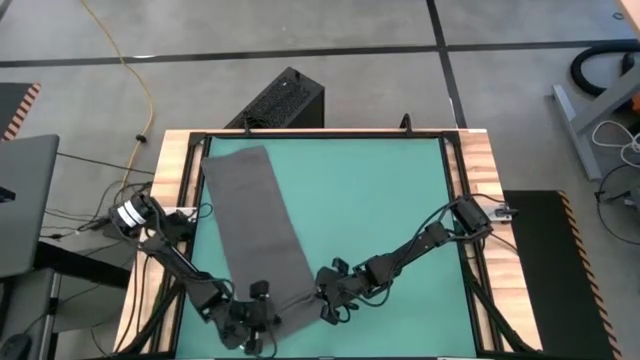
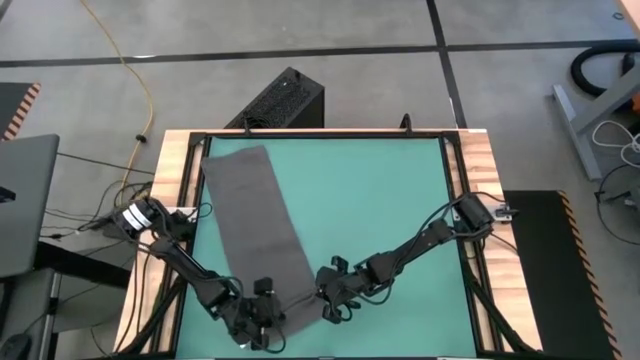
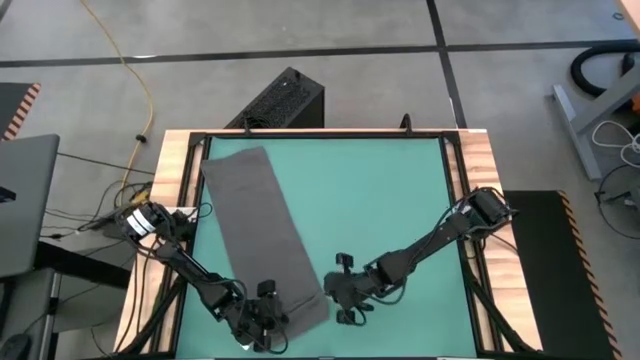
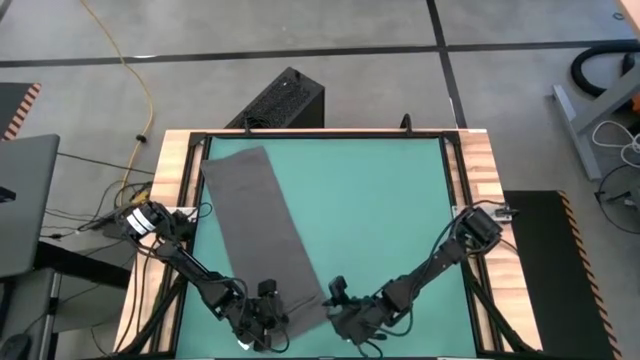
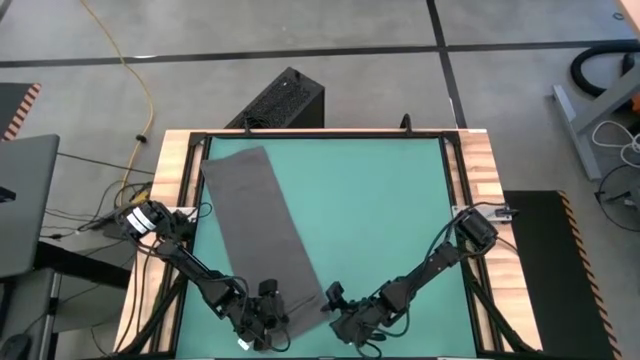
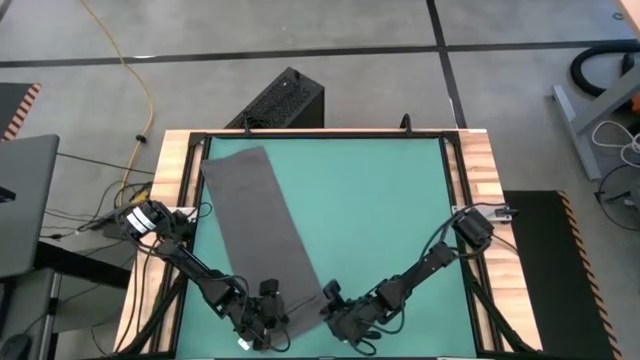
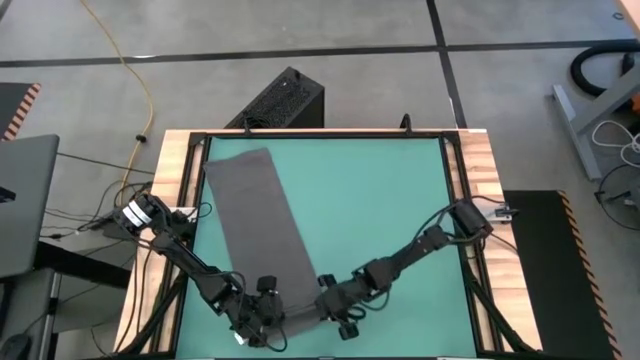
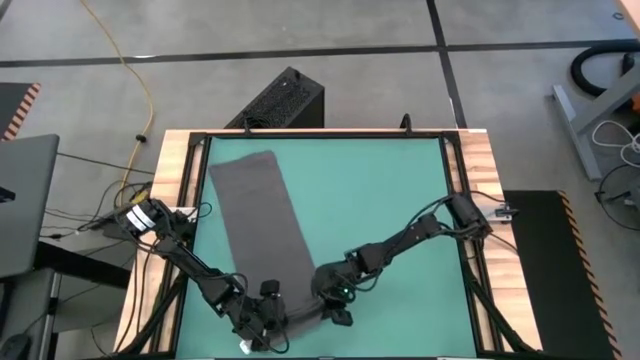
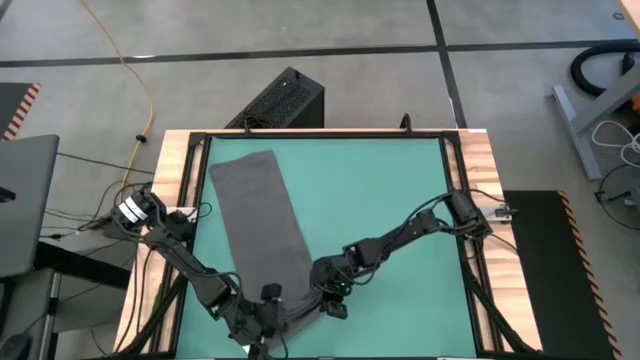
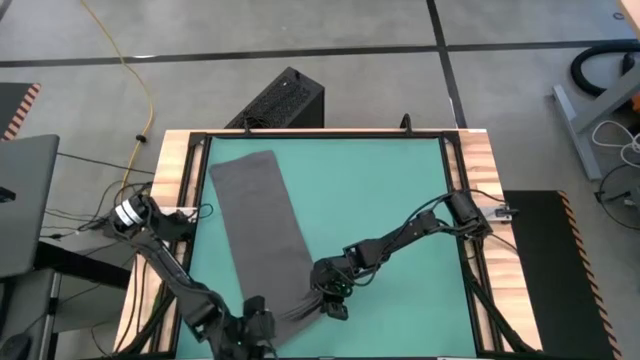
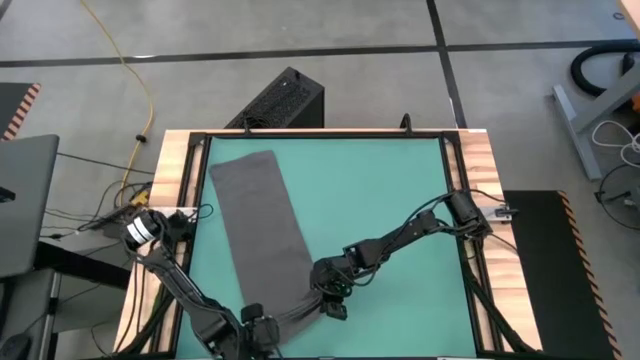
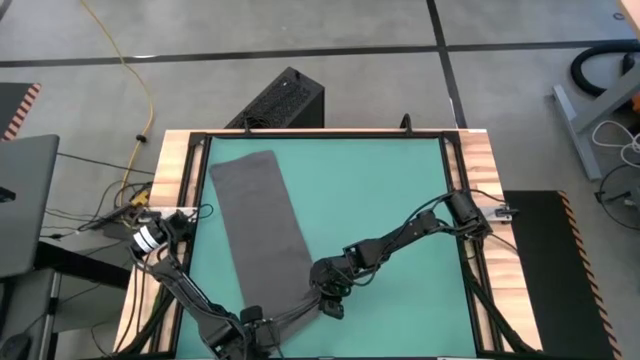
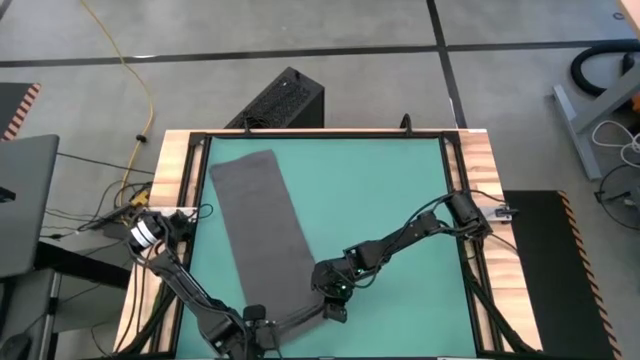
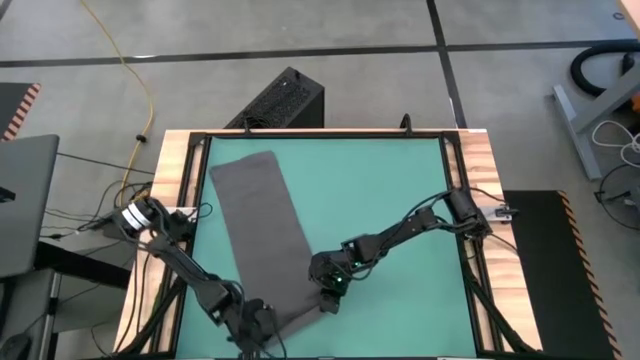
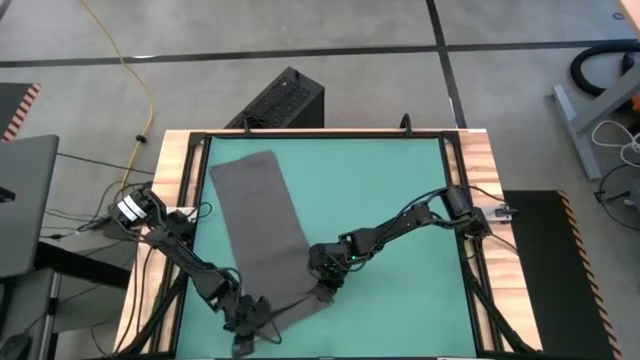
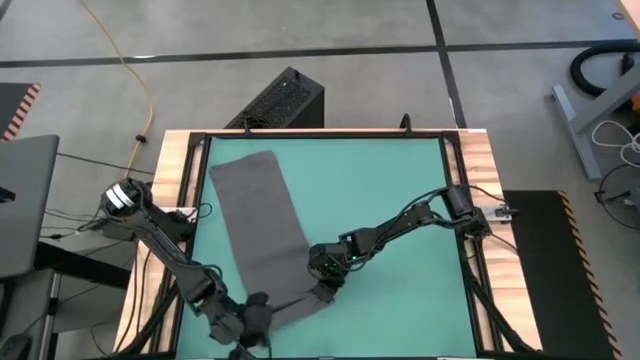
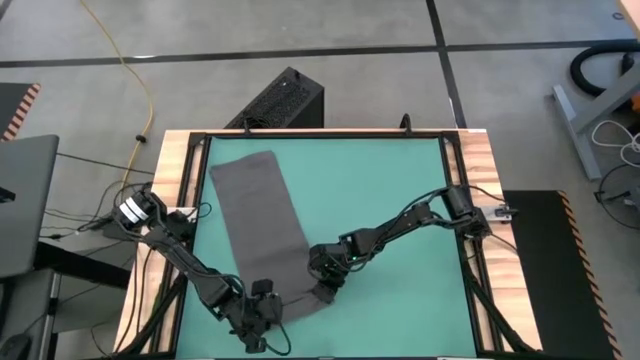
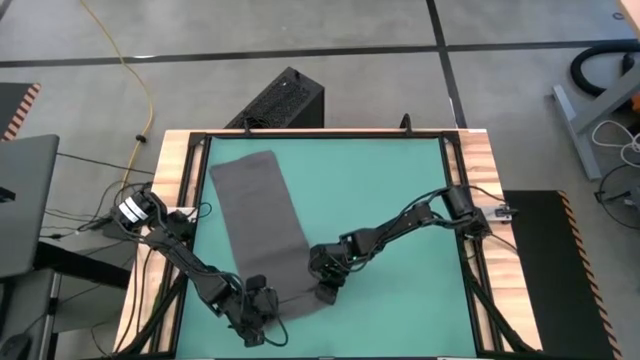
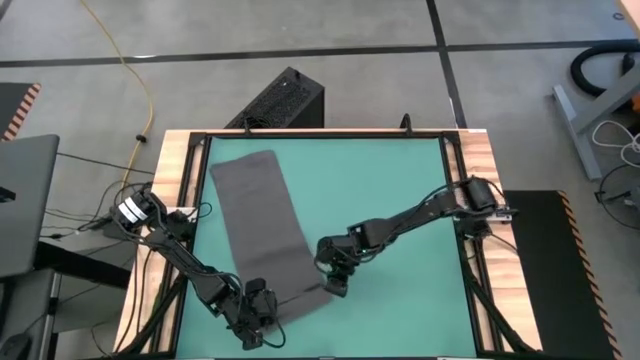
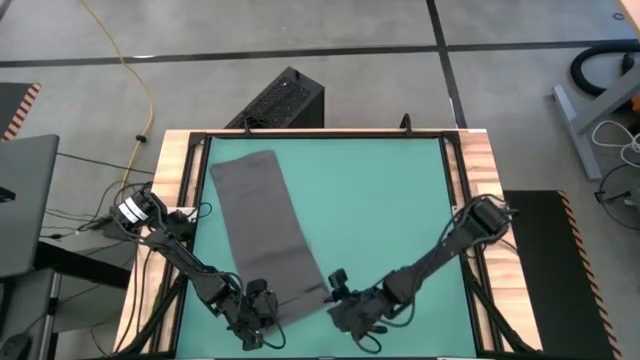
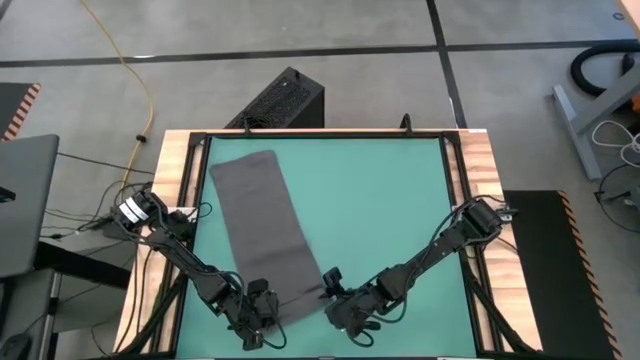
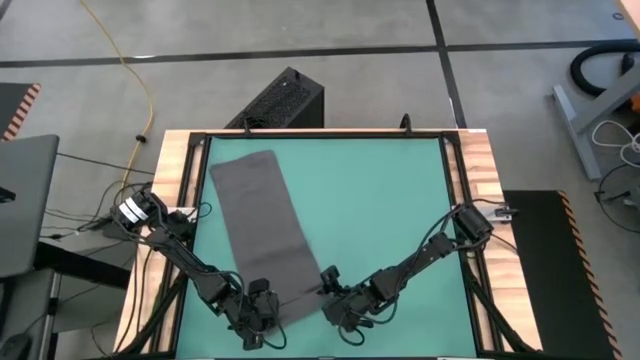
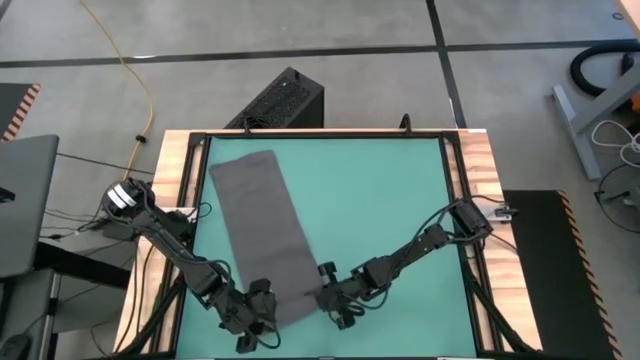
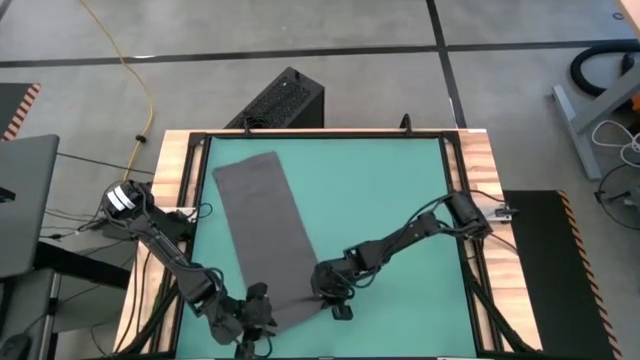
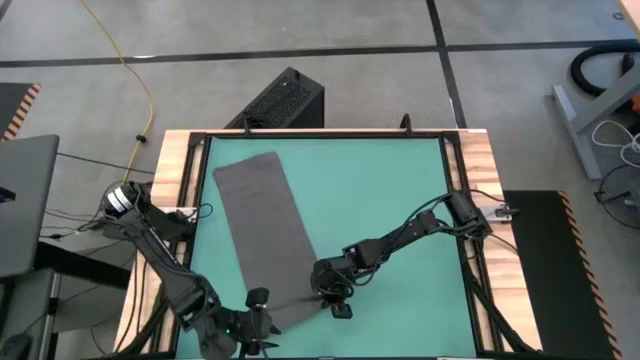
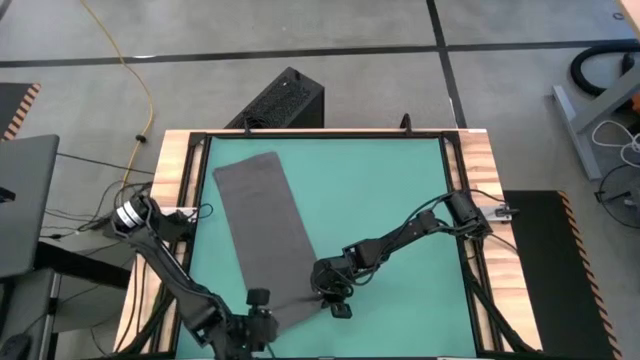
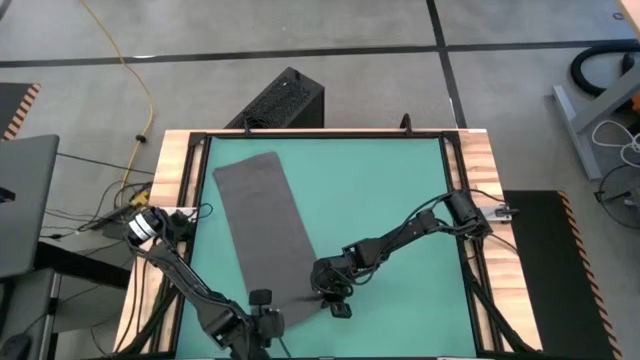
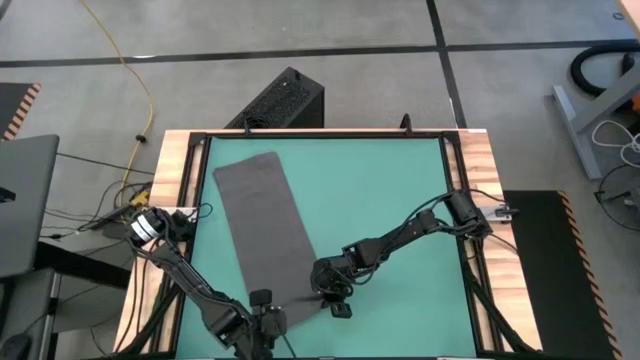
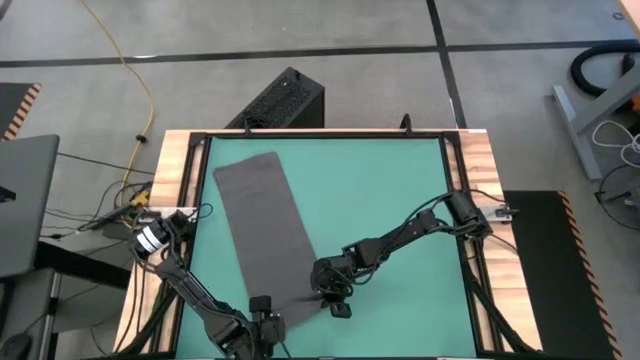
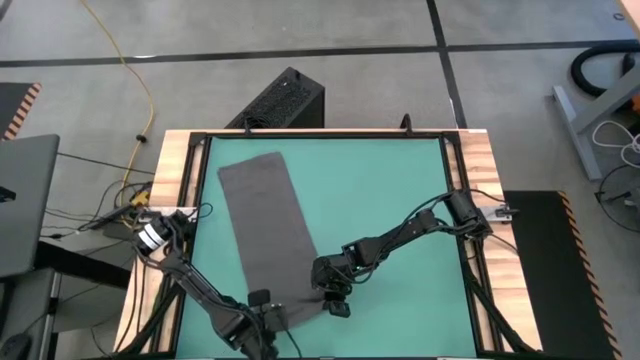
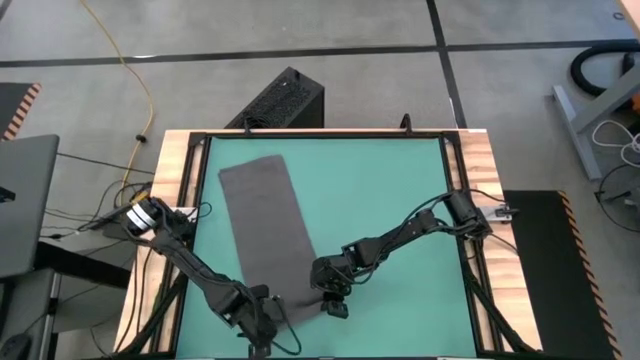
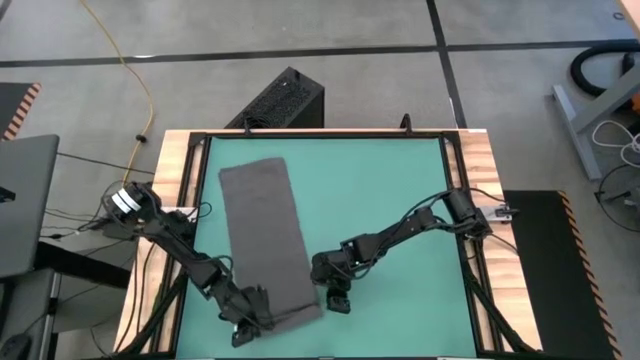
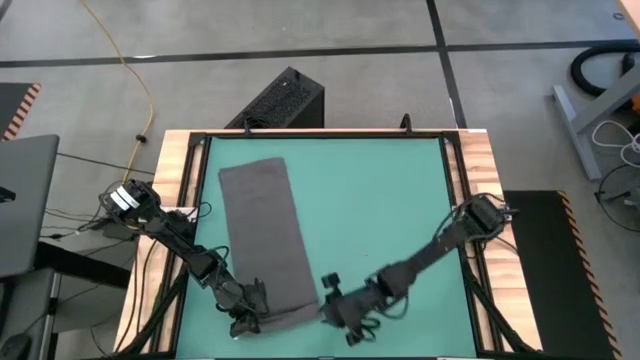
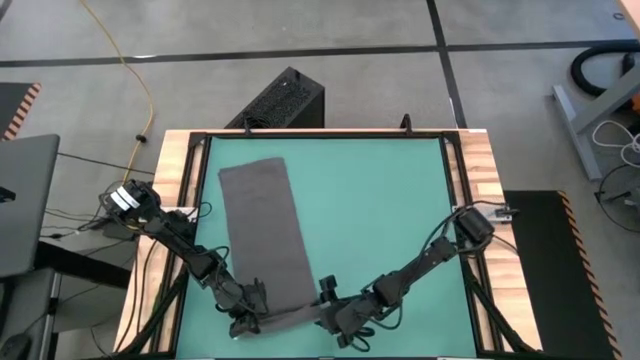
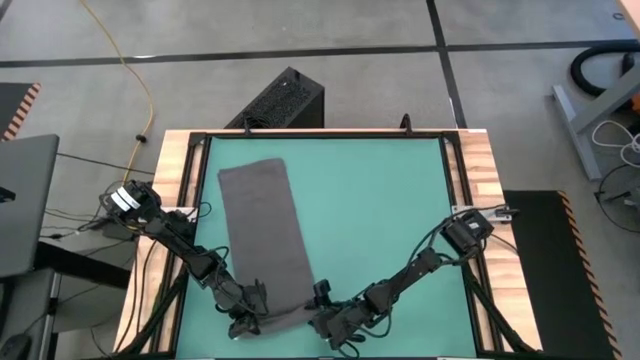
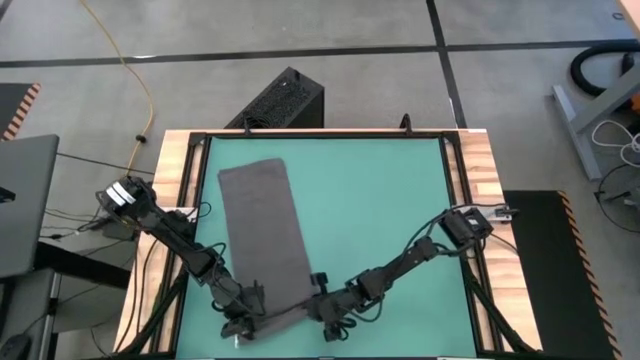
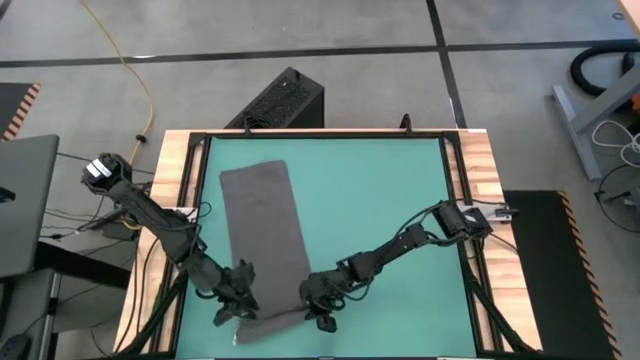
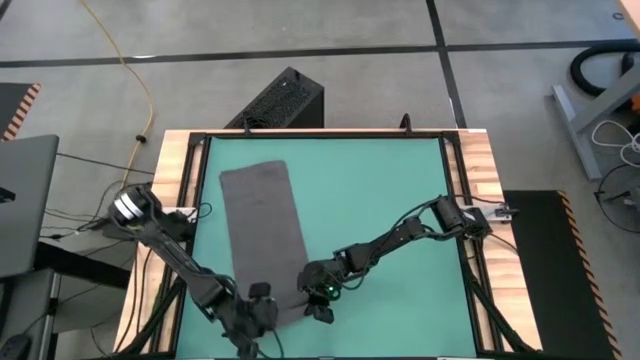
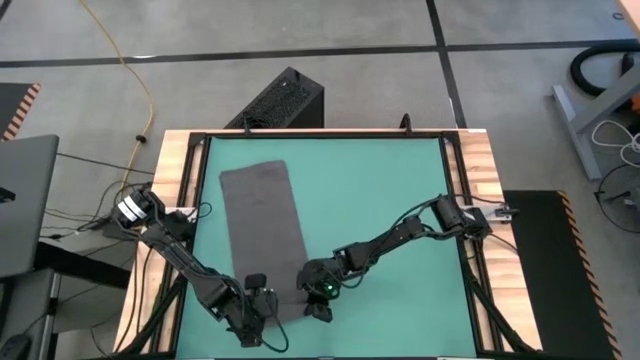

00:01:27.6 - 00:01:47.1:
Task: Roll towel
Roll the gray towel

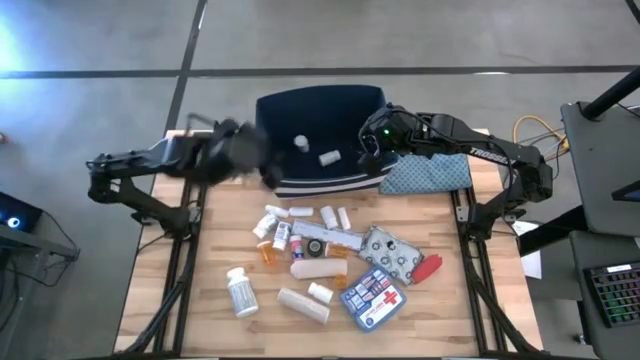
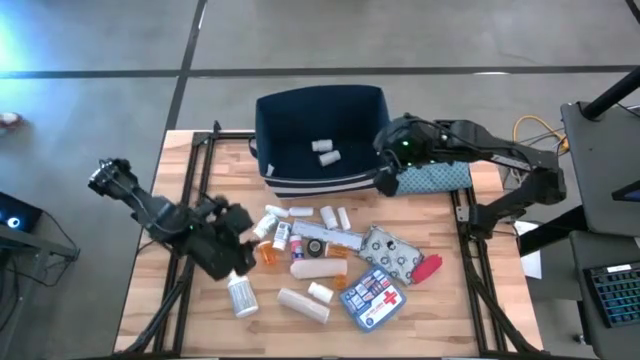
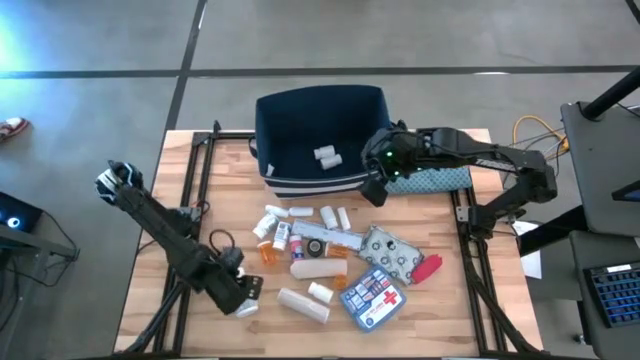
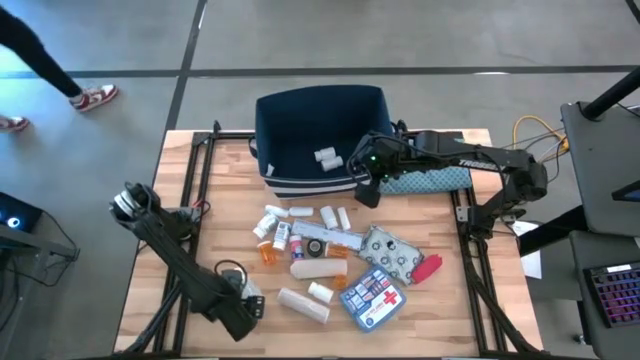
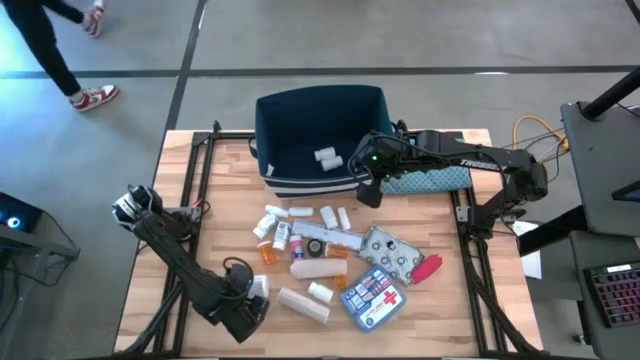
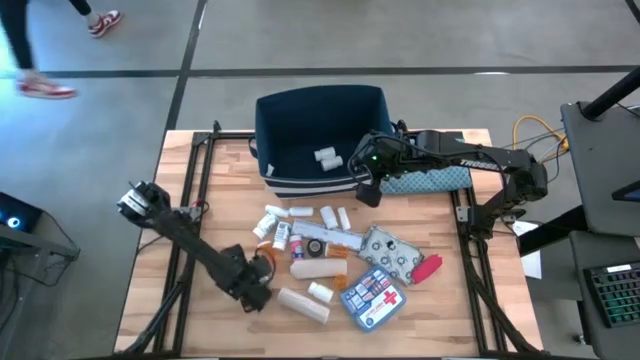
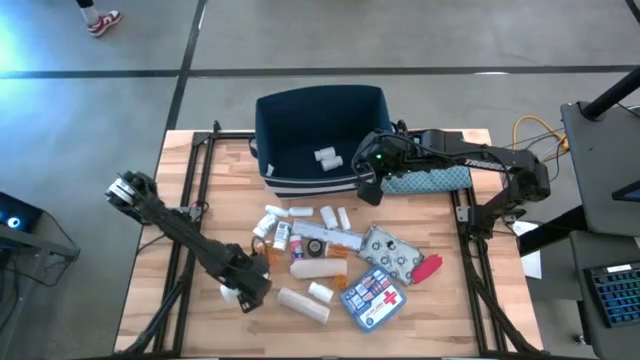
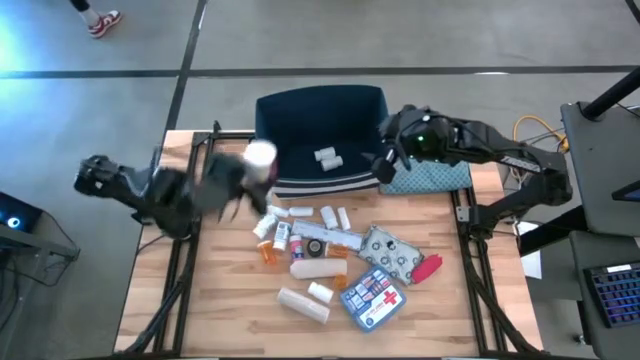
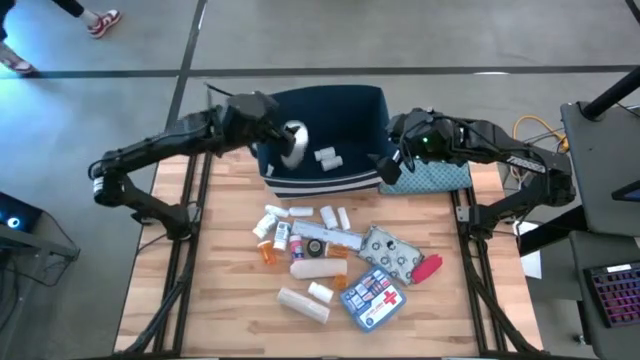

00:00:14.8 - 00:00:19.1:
Task: Pick & place medical supplies in basket/bin
Put the white medicine bottle into the blue bin
